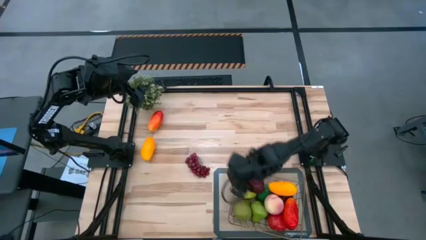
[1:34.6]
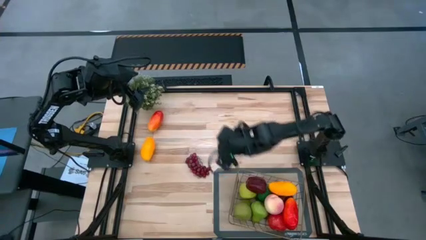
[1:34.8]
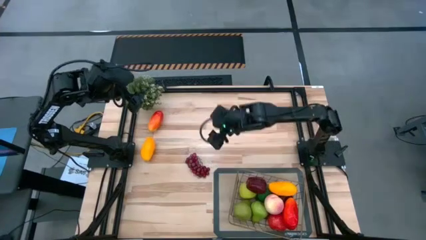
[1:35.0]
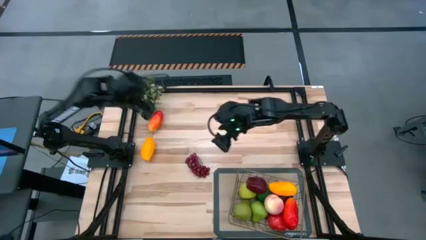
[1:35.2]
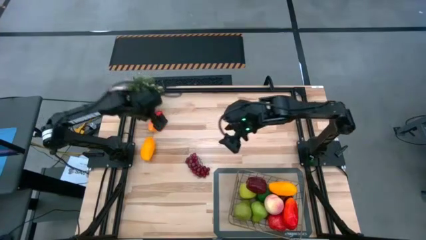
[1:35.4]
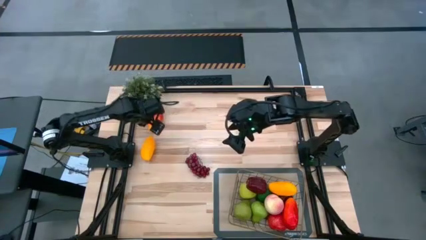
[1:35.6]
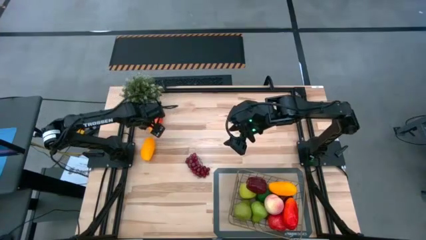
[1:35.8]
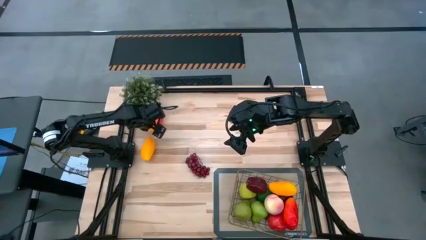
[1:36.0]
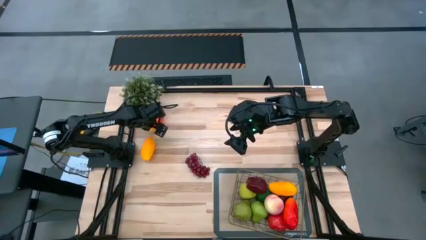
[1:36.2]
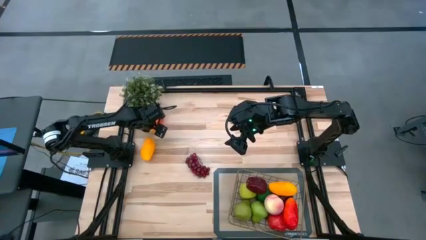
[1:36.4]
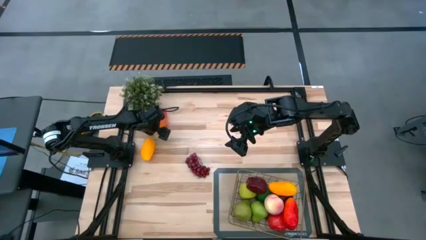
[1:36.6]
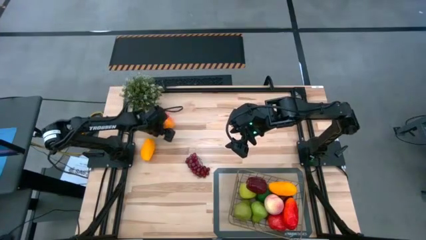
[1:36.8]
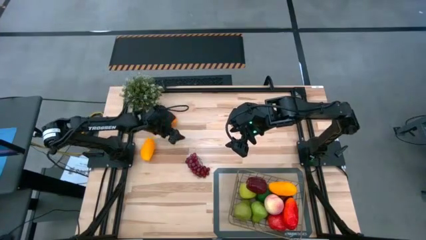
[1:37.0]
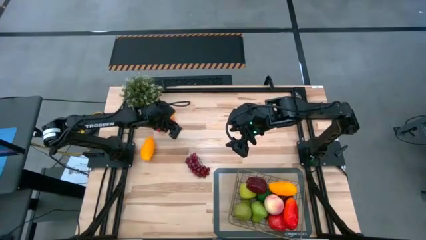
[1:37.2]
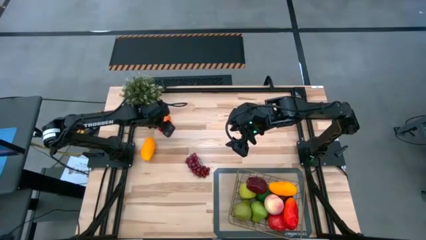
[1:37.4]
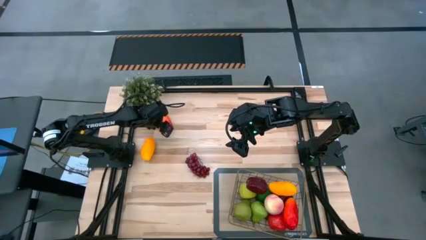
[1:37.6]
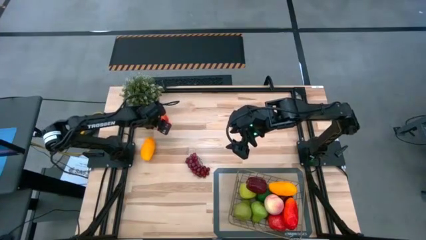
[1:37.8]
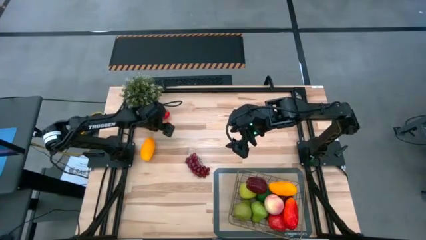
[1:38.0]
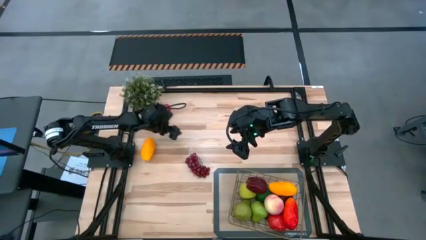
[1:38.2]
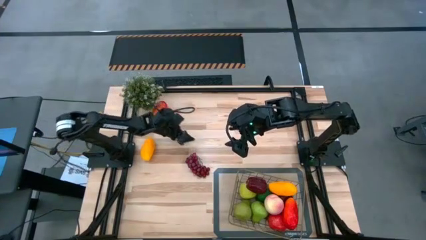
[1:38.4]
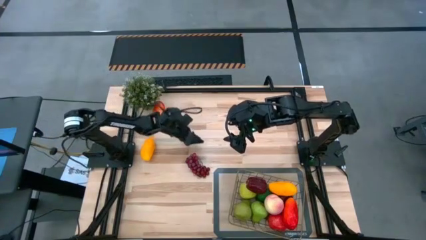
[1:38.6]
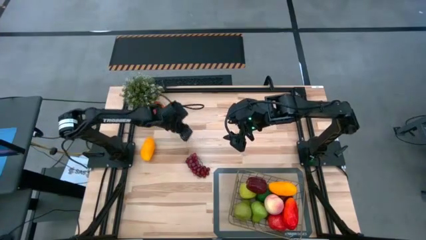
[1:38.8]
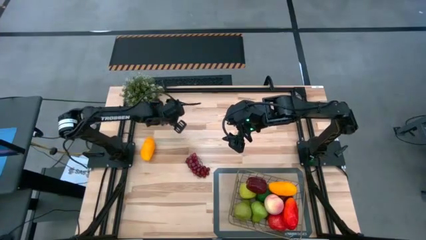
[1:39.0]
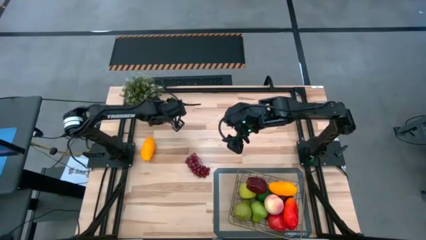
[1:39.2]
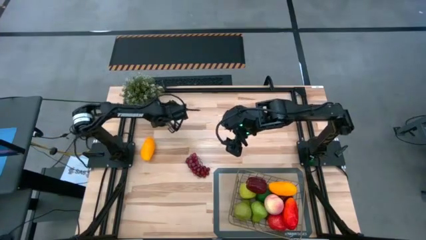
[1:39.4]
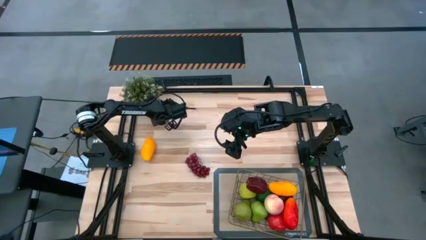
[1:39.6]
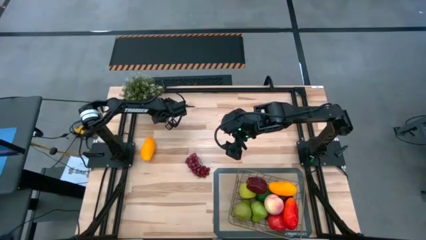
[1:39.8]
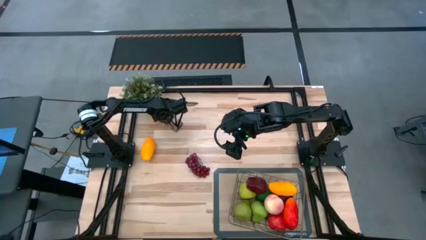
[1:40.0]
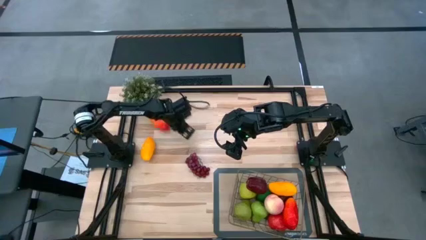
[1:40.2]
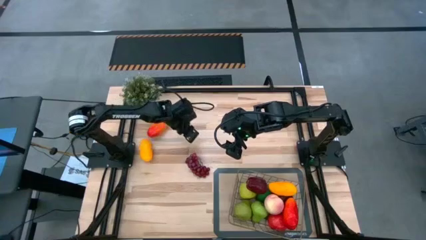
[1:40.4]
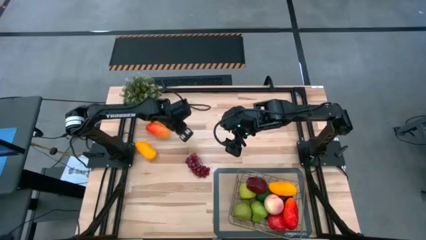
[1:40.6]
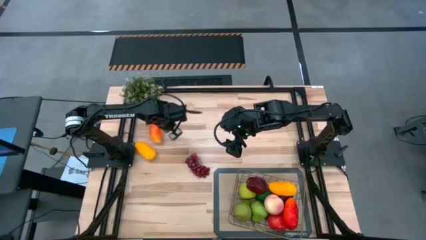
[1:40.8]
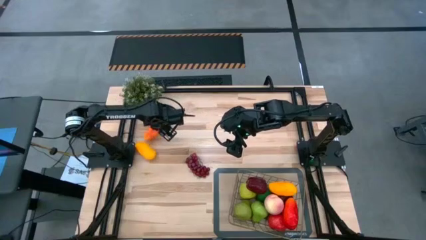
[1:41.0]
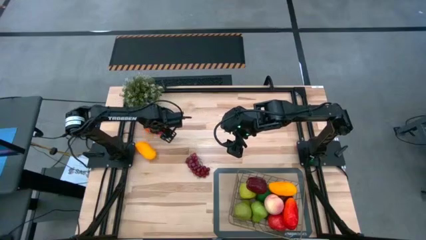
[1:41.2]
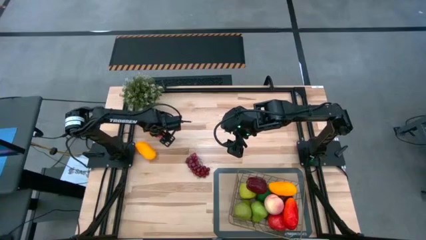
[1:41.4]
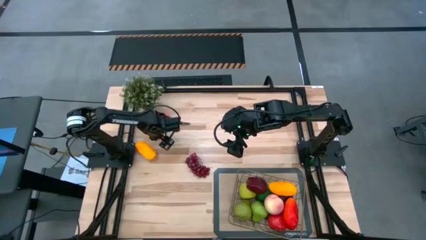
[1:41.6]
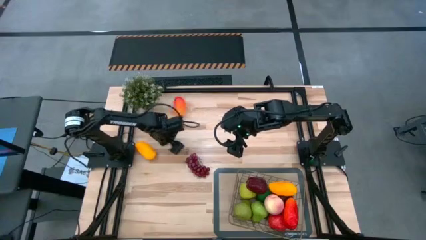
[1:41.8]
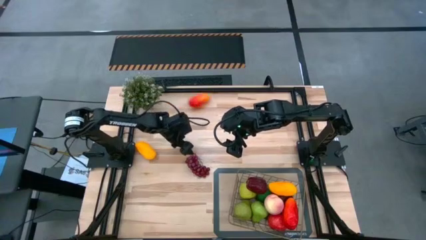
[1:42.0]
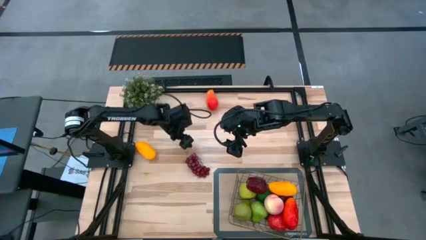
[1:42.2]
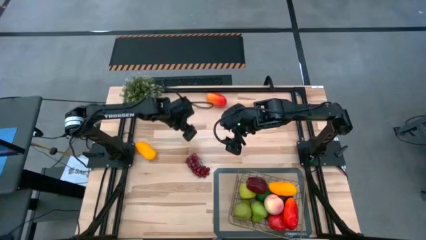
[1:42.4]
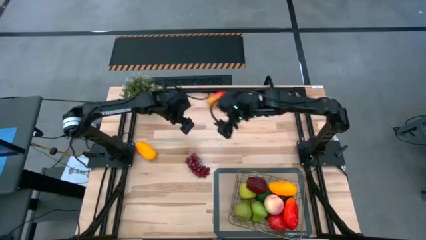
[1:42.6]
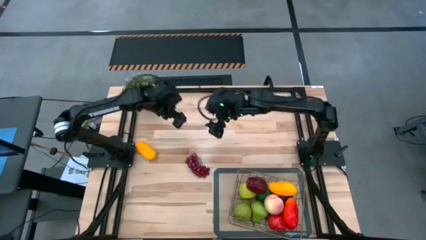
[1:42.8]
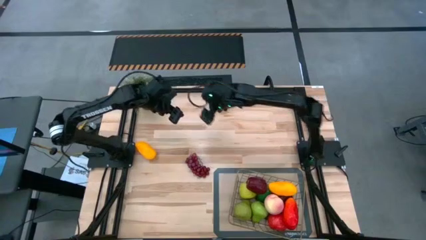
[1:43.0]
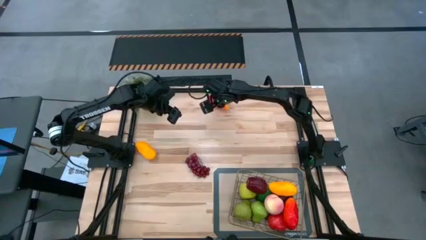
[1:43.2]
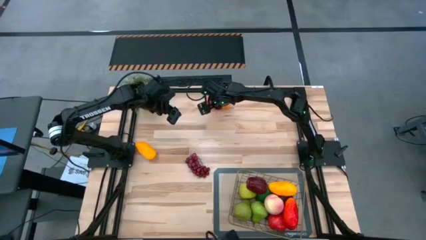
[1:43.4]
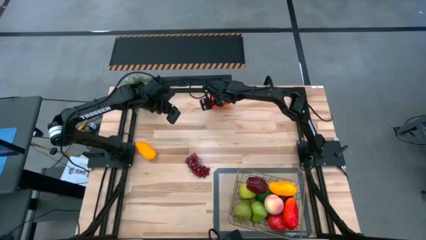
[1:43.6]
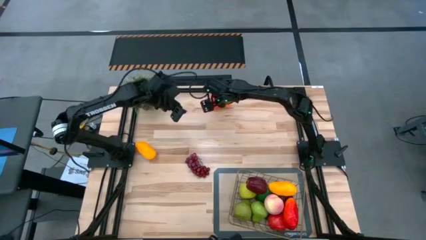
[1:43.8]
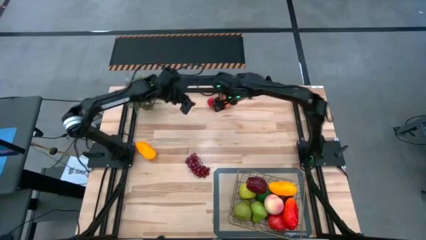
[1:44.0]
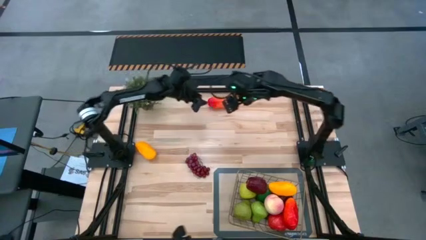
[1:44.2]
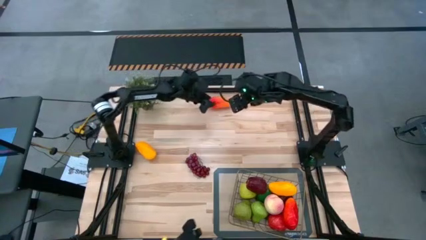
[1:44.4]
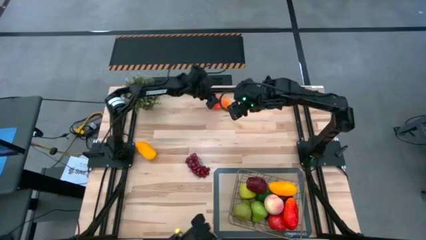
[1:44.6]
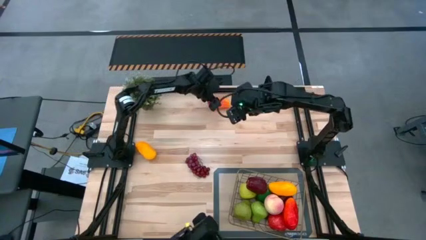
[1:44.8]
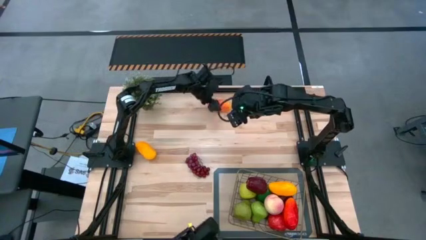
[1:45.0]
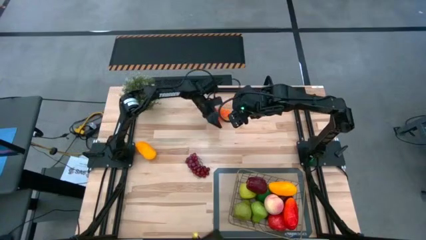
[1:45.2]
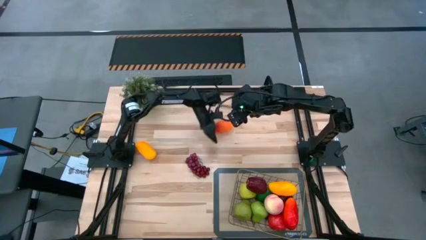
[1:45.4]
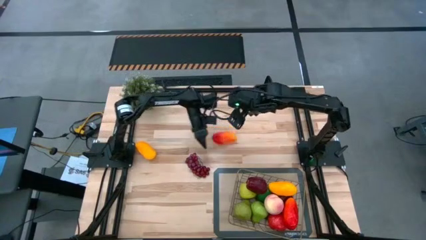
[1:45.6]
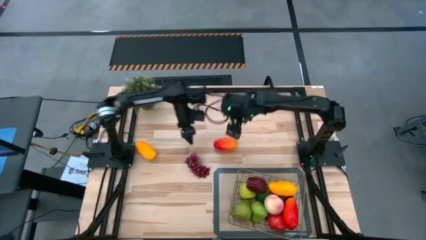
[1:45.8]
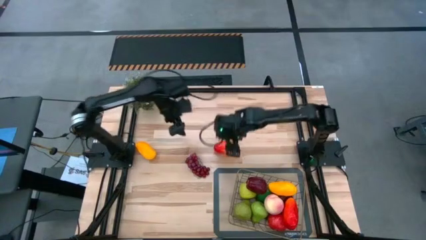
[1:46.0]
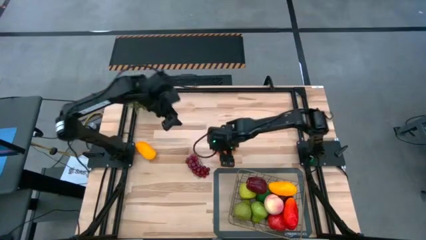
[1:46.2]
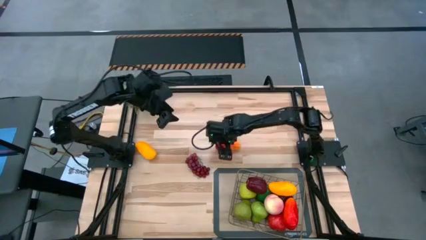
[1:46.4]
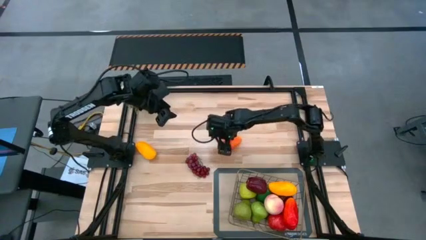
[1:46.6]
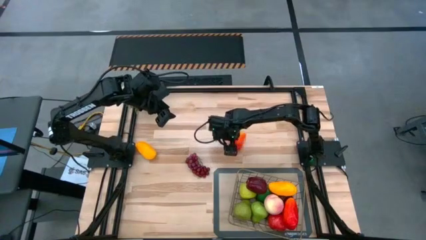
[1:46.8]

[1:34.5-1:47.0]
Task: Build produce basket
Put the orange mango into the wire basket
